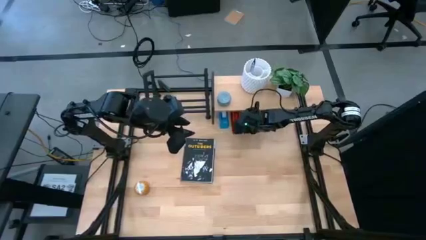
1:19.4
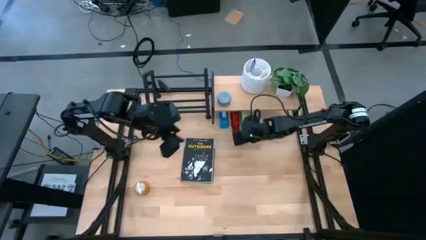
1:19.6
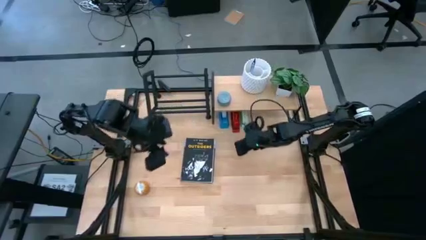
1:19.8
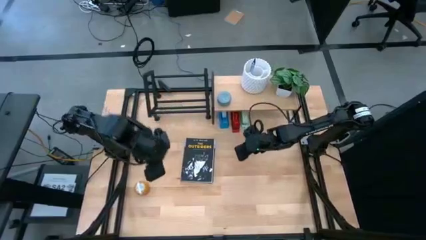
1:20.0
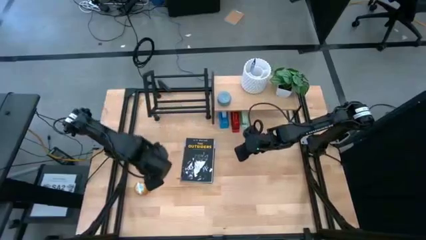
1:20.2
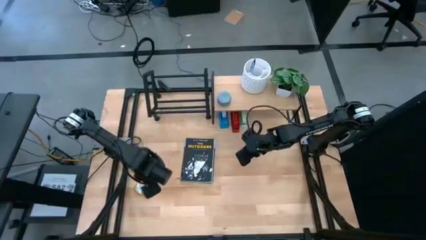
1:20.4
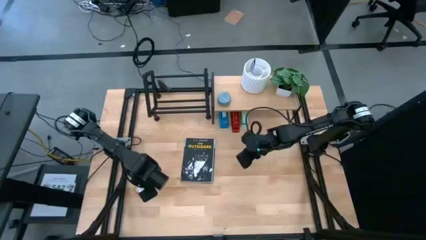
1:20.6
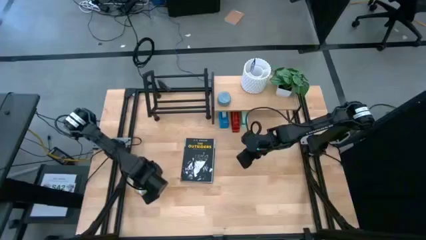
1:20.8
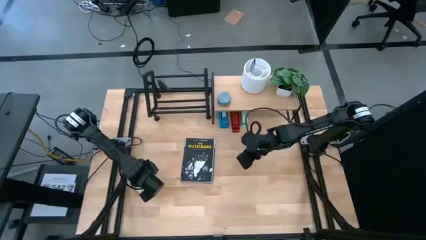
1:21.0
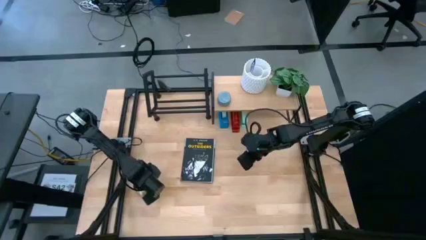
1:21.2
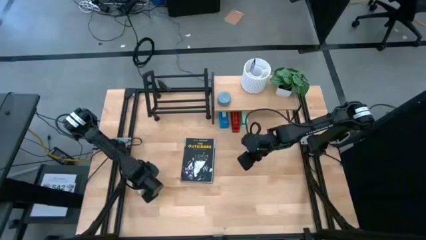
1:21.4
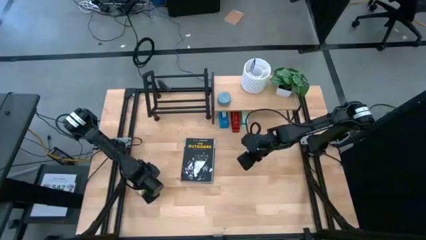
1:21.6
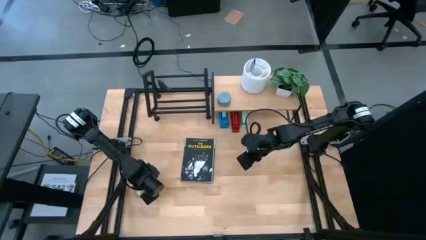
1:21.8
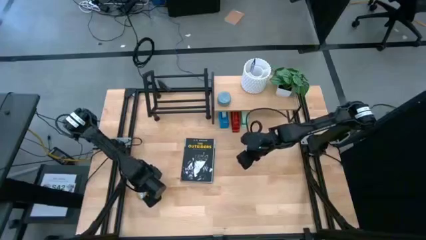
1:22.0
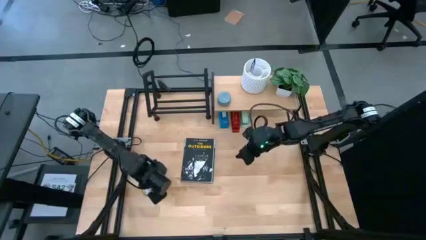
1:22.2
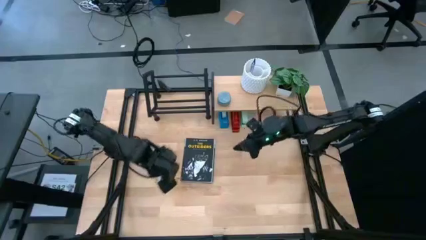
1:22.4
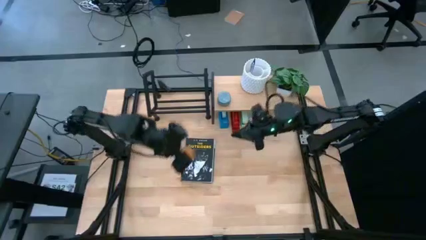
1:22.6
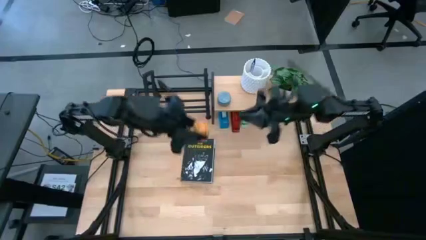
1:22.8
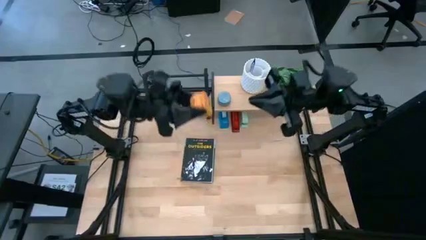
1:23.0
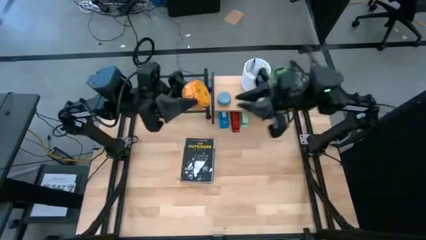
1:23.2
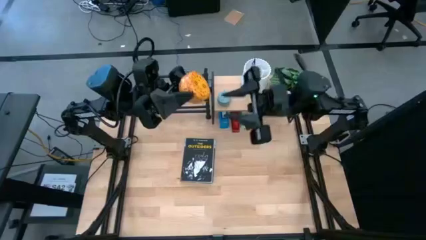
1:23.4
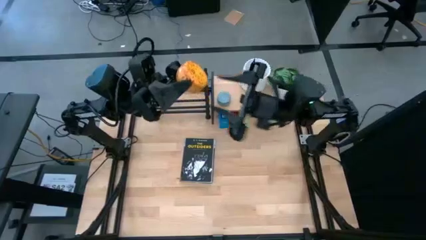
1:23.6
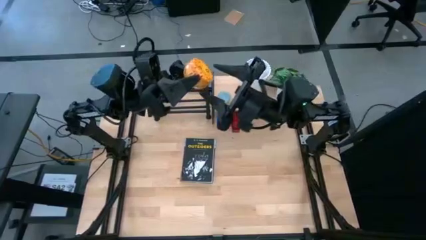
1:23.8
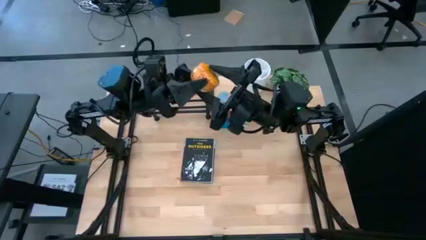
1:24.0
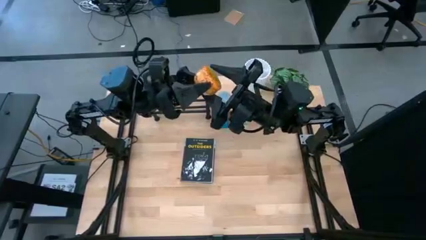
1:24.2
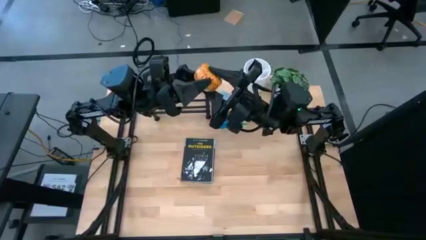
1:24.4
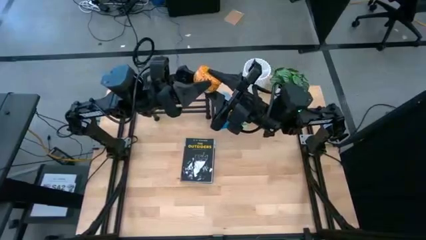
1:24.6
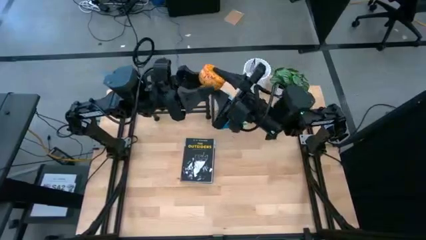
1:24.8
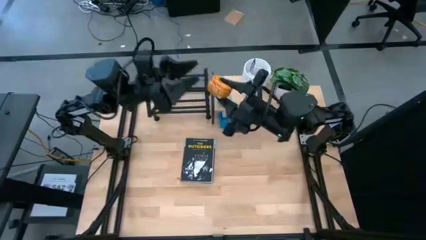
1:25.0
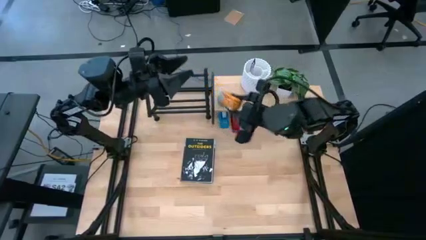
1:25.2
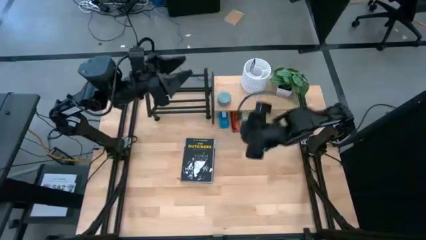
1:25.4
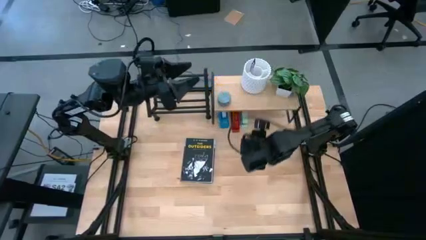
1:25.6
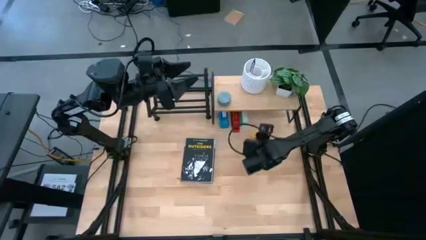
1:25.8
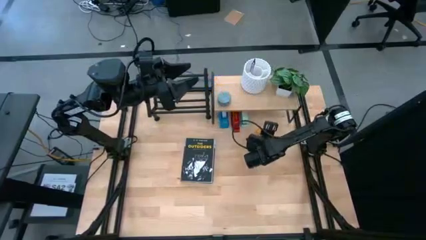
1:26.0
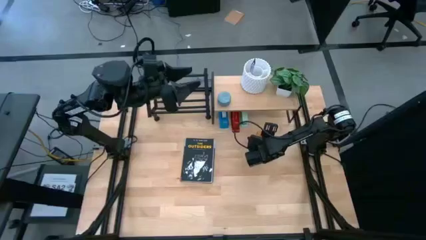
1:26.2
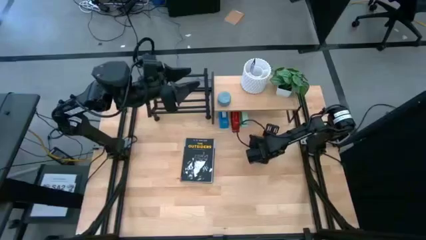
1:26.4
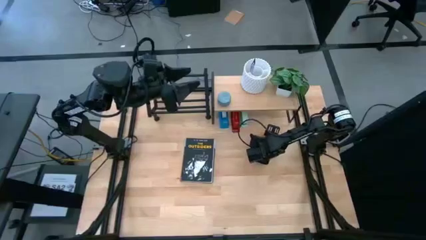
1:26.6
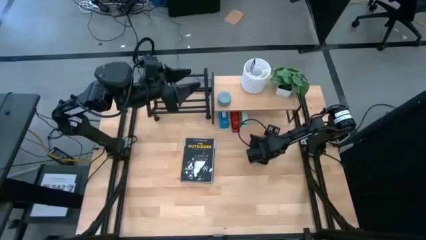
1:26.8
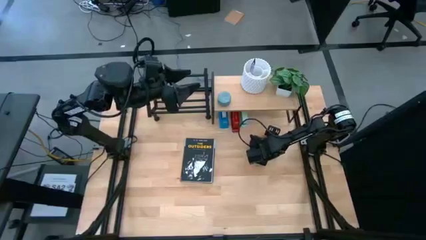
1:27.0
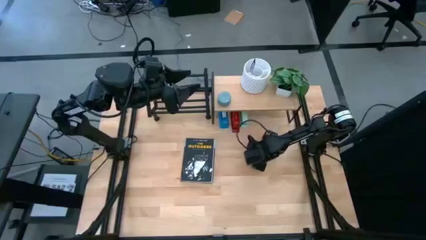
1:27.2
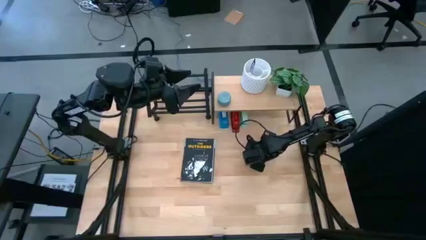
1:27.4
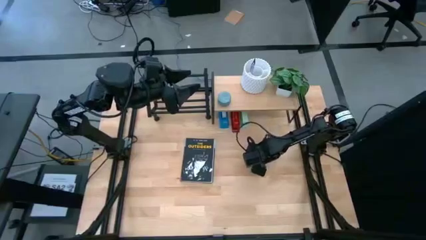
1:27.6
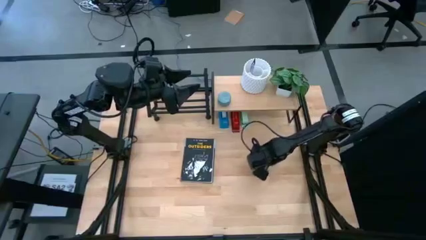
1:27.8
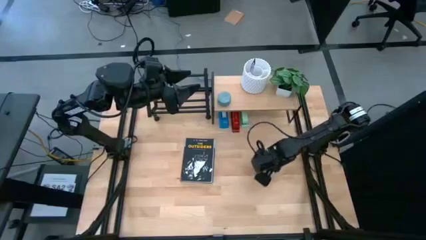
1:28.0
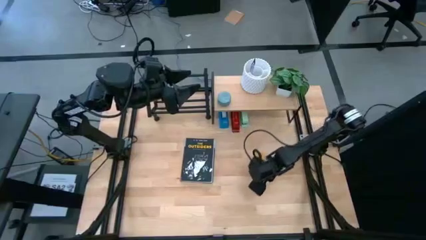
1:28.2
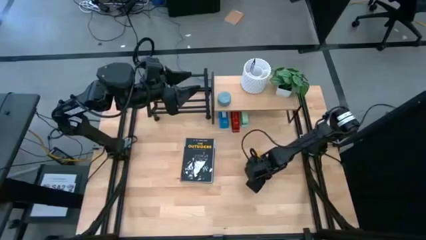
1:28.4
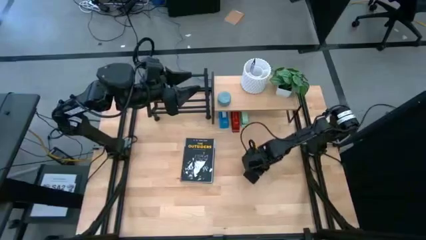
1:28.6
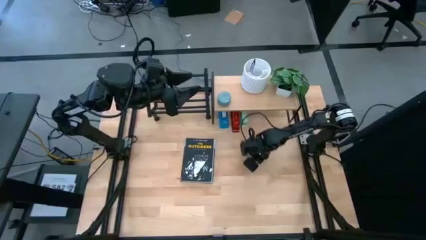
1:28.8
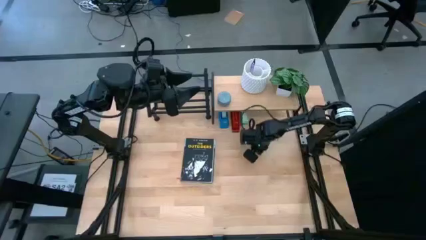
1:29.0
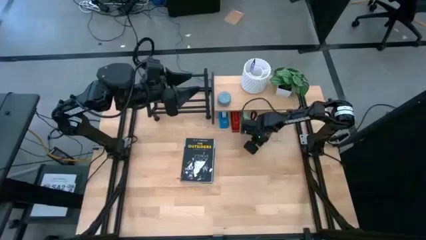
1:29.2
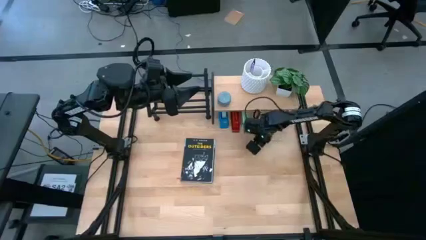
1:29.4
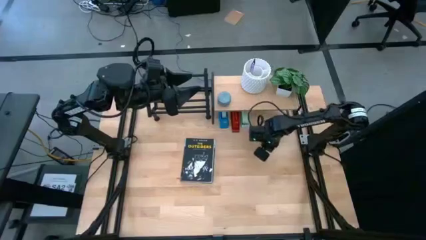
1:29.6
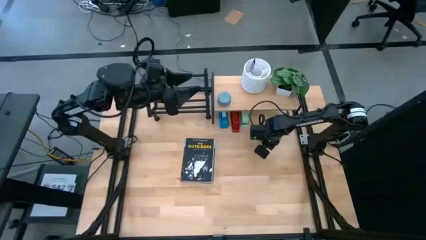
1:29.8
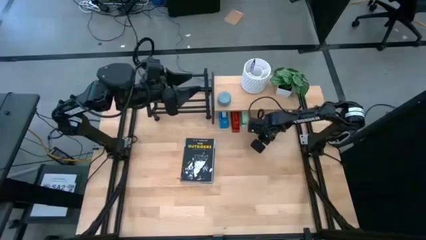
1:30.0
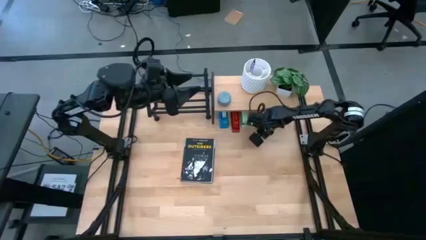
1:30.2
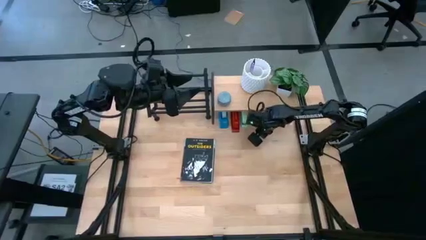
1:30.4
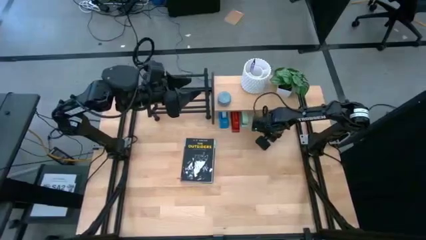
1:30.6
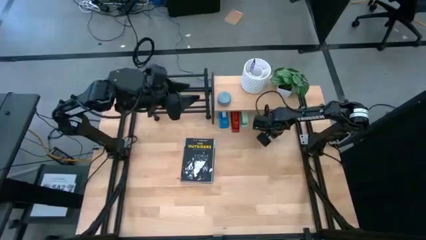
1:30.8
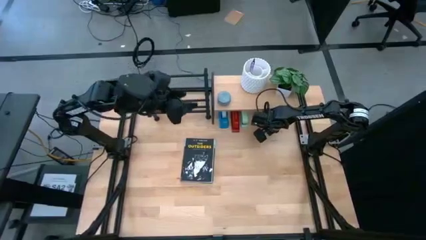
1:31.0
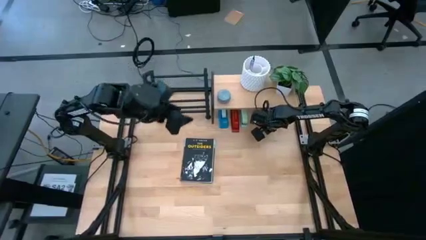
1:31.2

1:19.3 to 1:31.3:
Task: Stock shelves
Put the yellow scented candle under the shelf

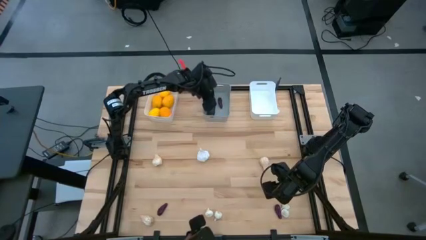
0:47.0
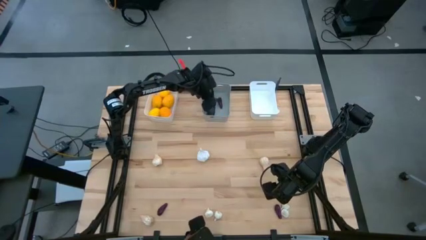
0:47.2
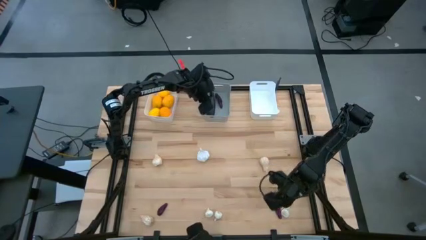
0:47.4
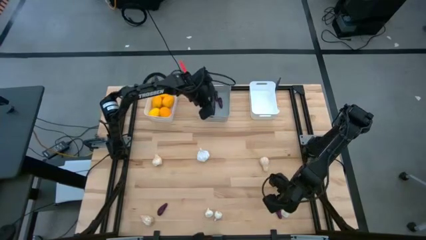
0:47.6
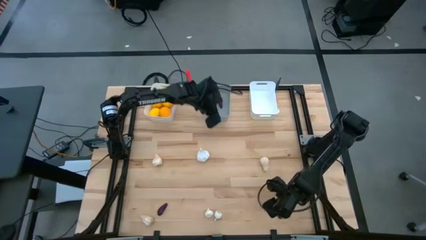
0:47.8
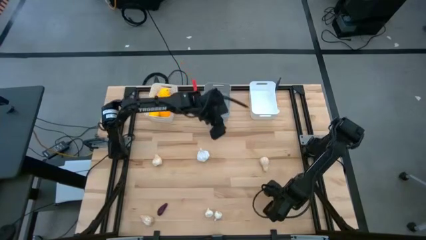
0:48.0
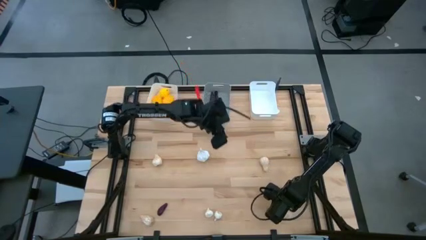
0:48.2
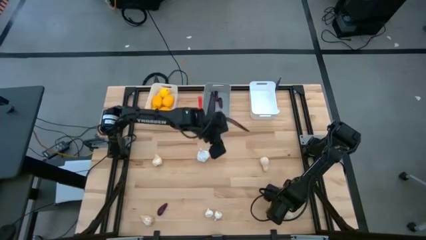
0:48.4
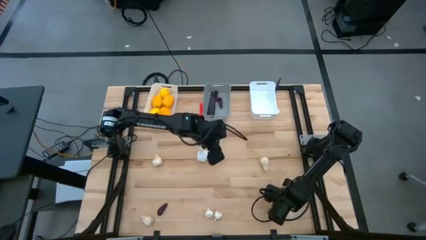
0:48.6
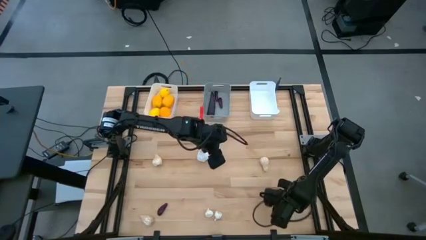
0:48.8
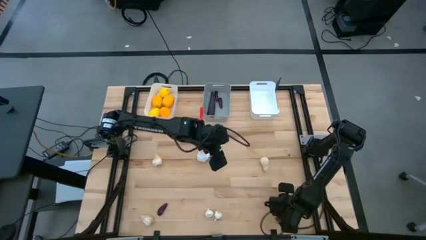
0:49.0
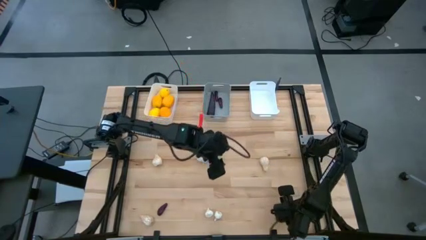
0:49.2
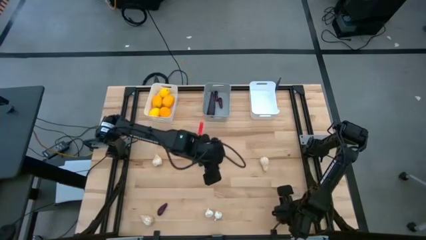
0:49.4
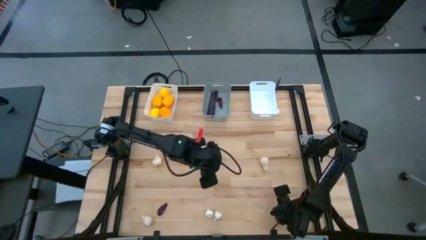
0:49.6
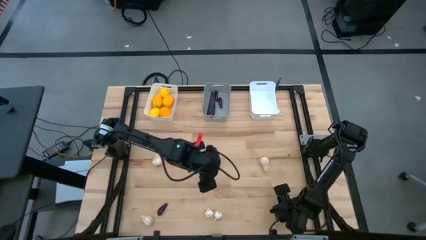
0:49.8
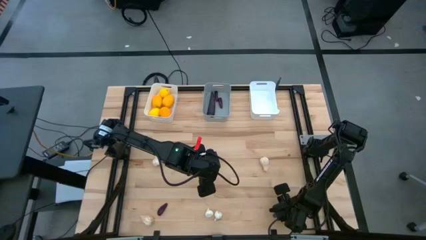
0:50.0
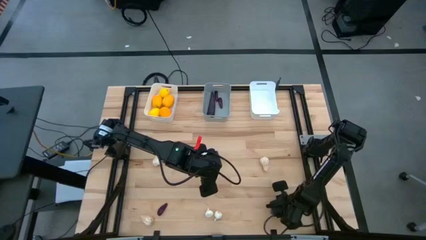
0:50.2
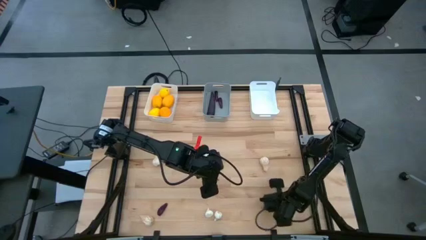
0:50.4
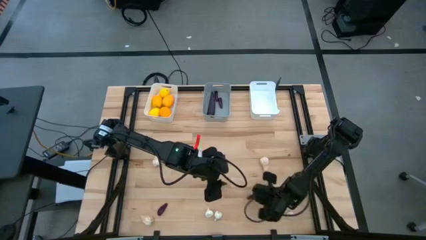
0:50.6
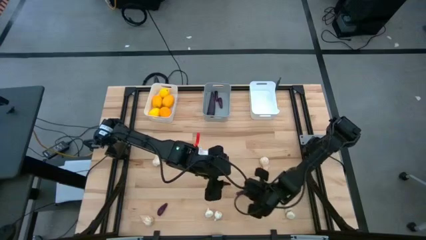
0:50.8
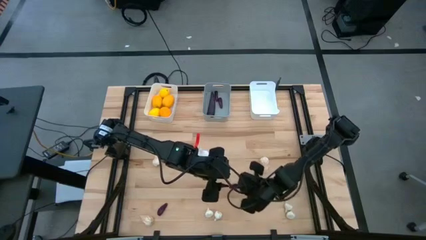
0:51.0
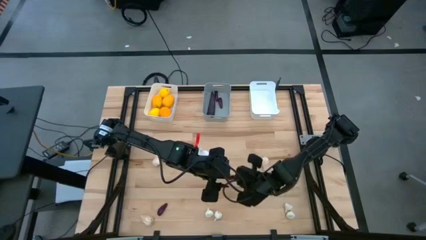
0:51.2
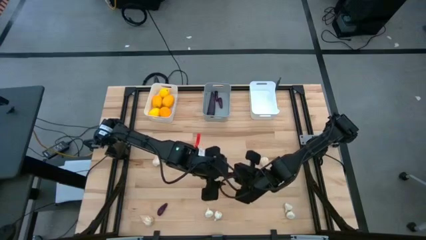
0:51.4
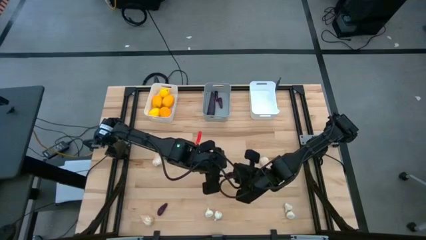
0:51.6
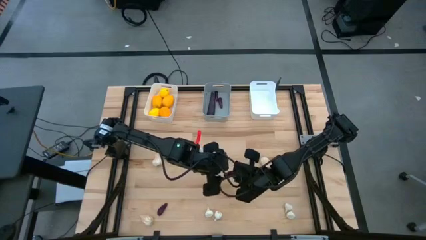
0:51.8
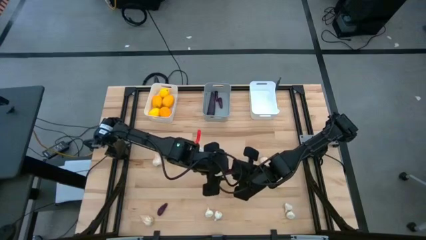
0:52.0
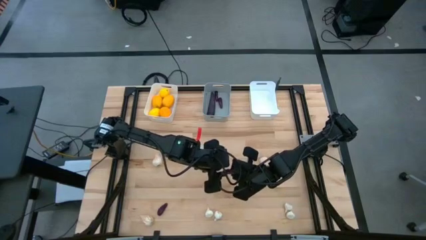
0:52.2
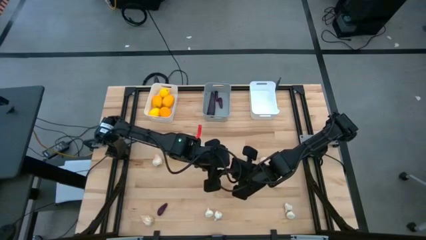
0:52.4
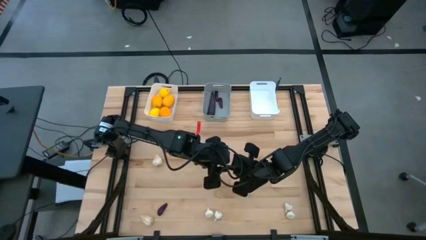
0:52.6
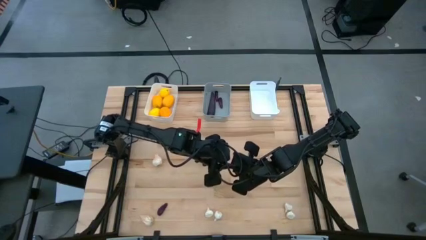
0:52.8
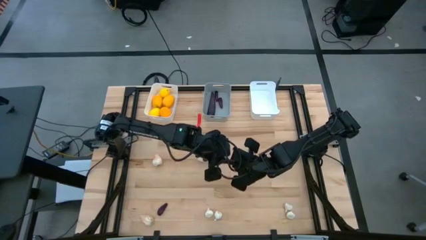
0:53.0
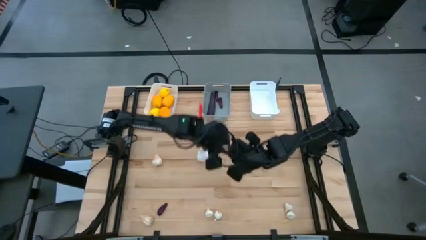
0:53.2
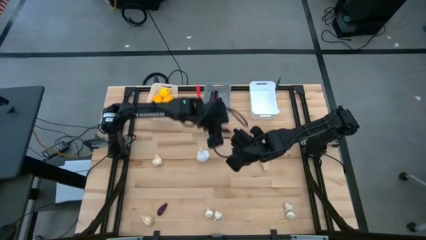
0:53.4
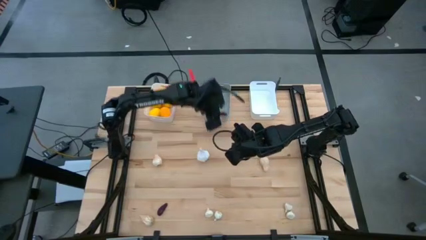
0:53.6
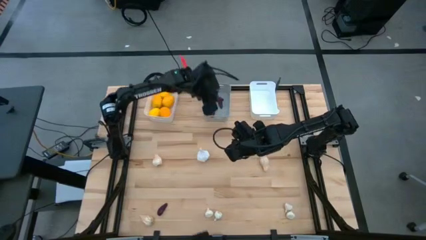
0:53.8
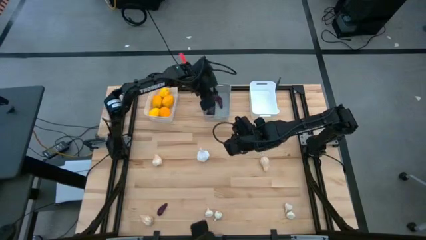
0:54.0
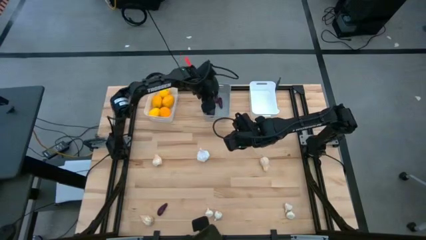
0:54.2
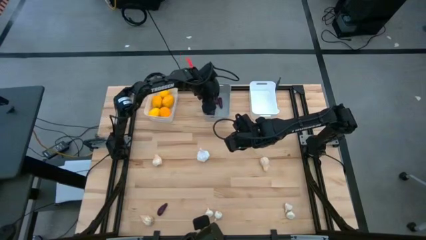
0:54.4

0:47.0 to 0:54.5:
Task: Sort produce into baskets
Put the eggplant into the gray bin
